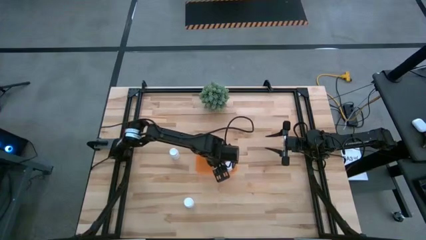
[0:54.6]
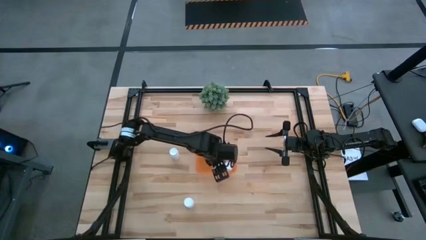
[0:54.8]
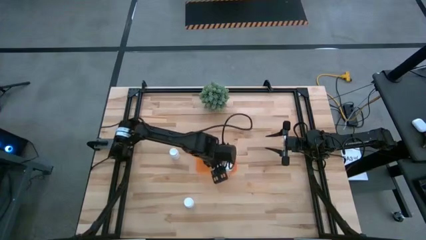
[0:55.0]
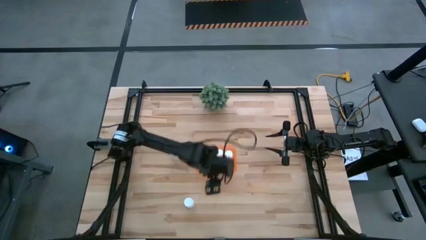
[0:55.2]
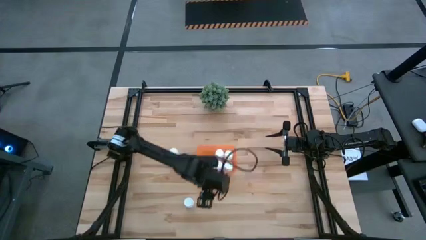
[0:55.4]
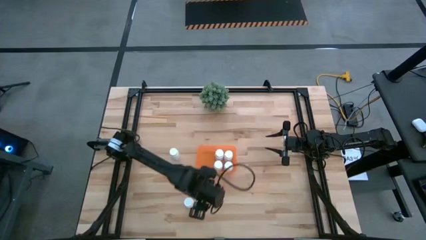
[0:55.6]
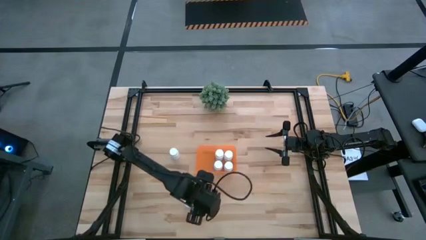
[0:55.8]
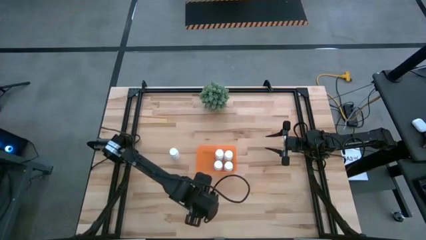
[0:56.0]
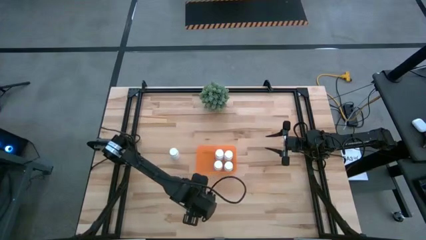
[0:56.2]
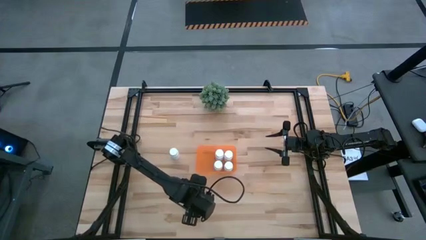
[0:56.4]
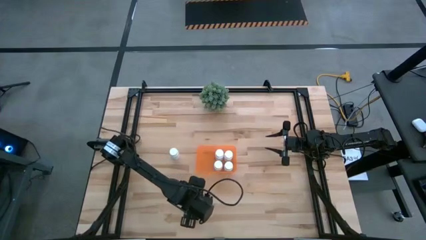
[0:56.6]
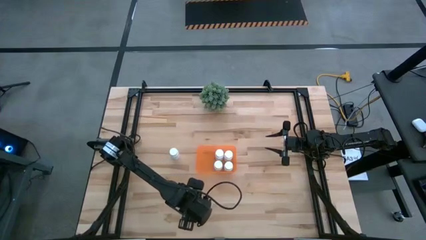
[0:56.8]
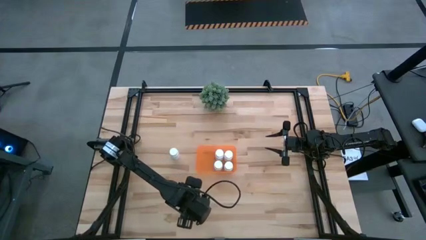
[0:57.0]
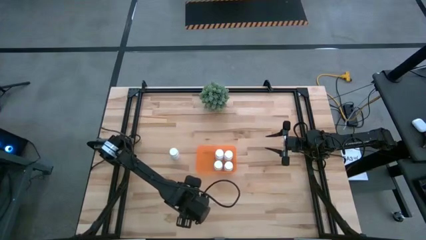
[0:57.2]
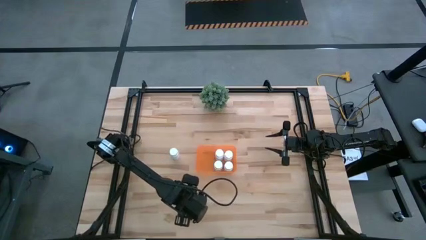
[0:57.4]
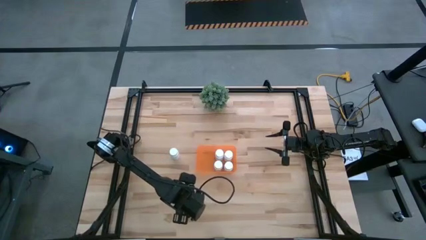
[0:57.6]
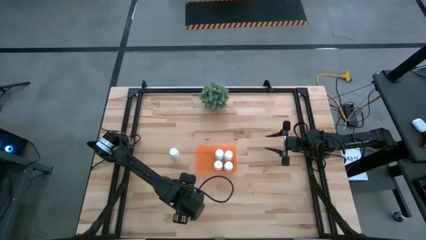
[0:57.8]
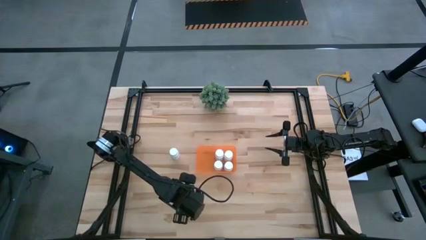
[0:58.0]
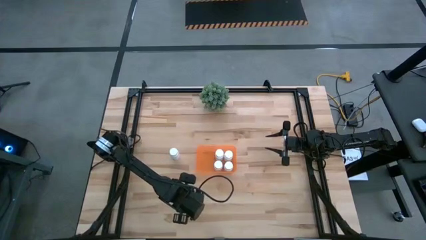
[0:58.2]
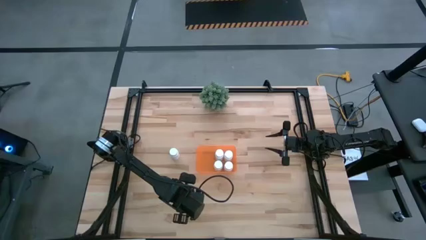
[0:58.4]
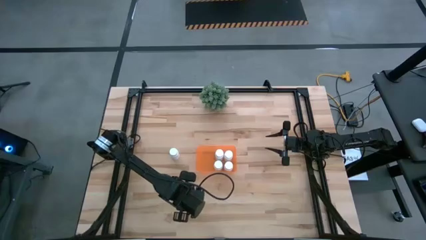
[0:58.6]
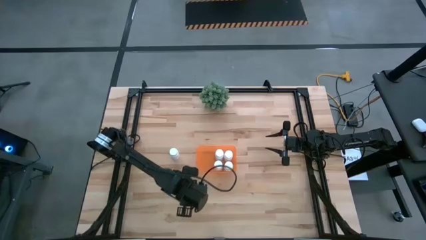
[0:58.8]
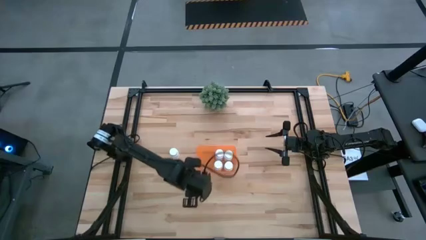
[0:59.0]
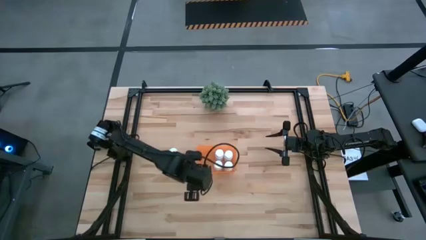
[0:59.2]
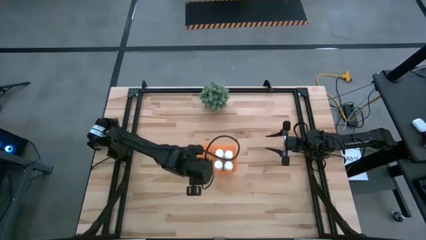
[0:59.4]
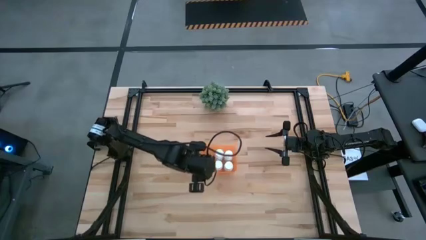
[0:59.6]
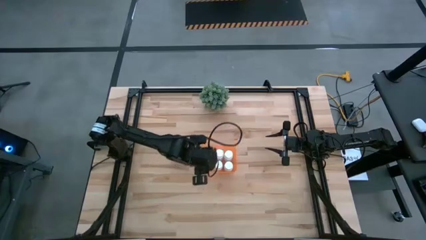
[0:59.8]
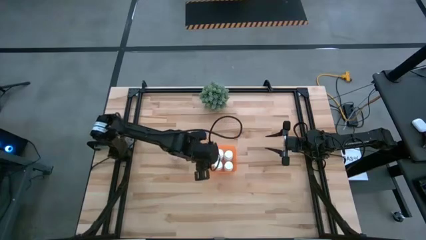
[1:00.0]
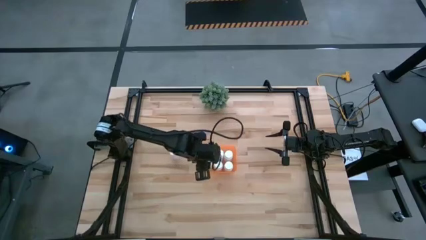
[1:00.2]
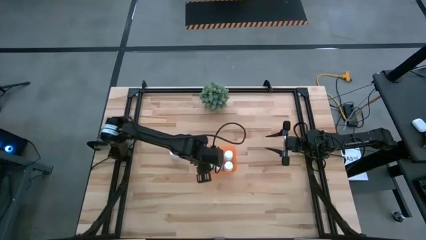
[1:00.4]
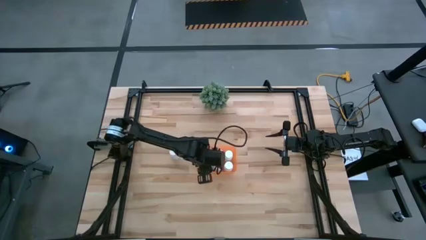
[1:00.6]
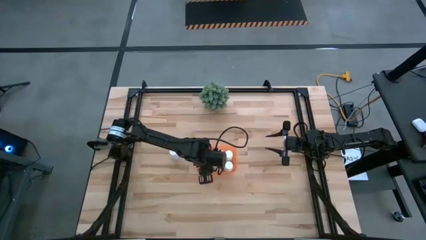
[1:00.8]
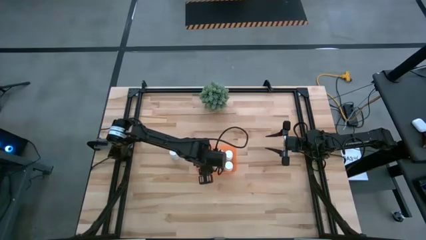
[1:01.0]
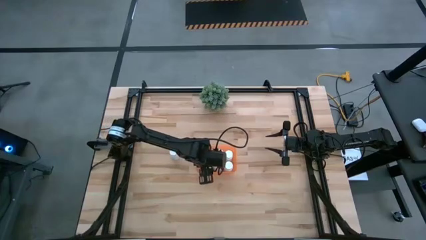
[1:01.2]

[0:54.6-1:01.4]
Task: Pick and place pill bottles into a basket
Put the white medicine bottle into the orange bin

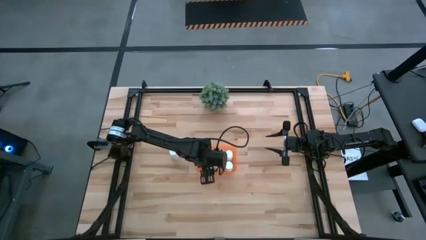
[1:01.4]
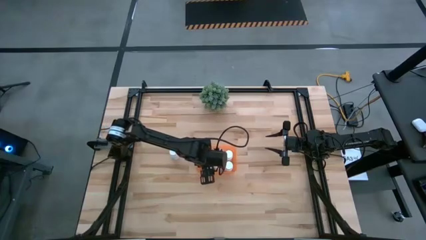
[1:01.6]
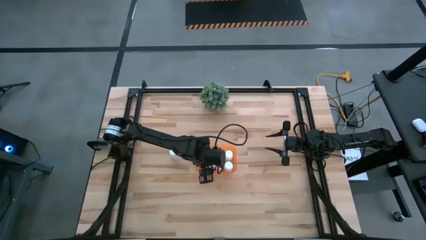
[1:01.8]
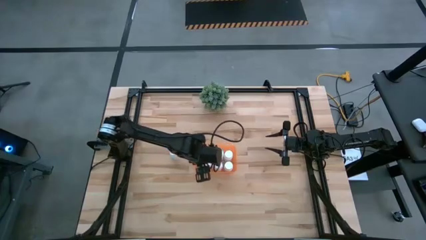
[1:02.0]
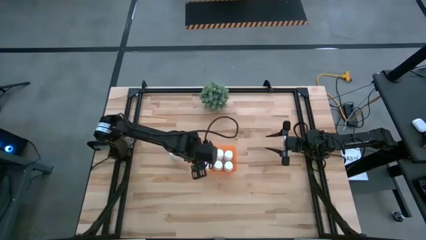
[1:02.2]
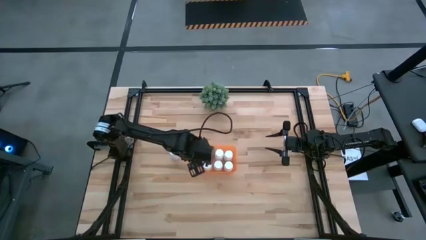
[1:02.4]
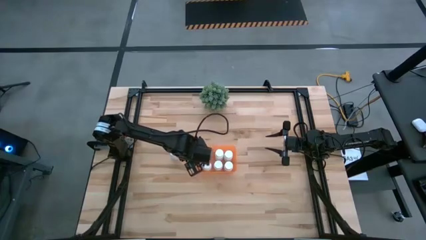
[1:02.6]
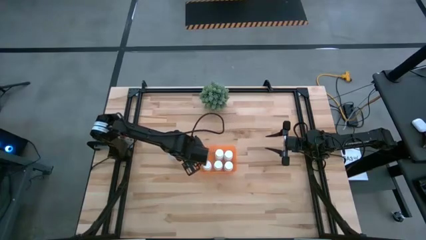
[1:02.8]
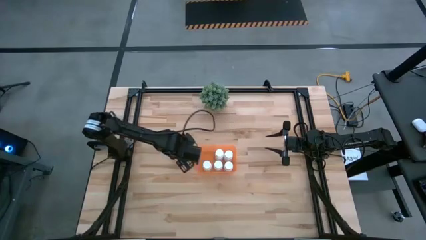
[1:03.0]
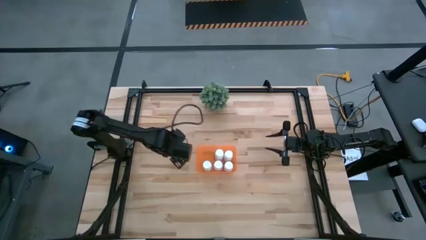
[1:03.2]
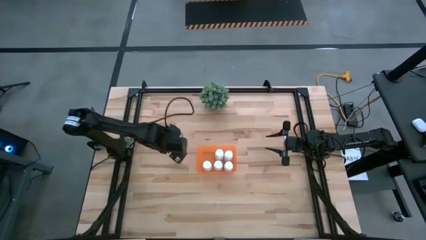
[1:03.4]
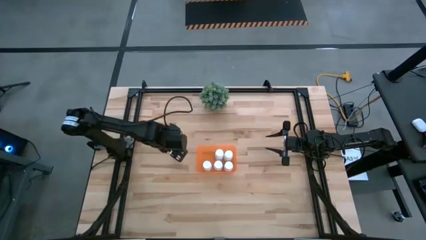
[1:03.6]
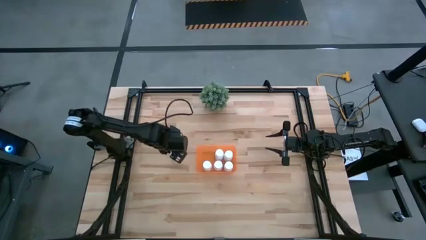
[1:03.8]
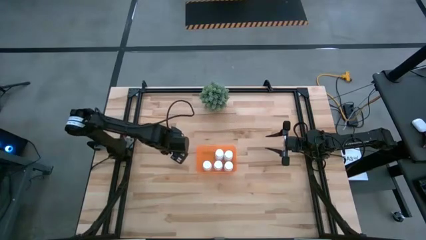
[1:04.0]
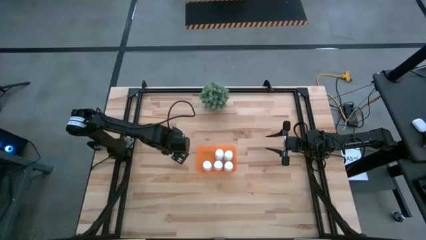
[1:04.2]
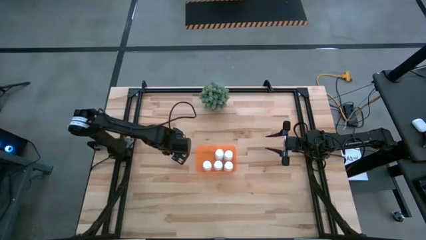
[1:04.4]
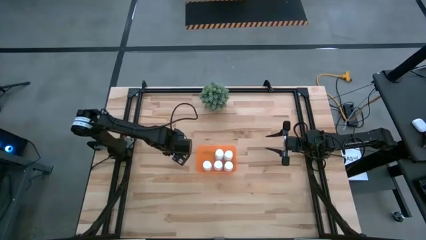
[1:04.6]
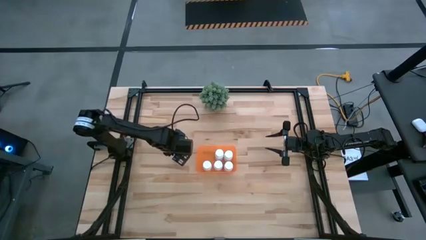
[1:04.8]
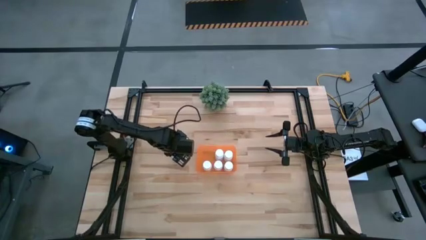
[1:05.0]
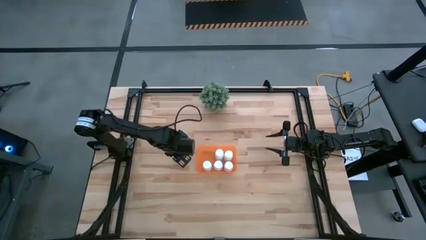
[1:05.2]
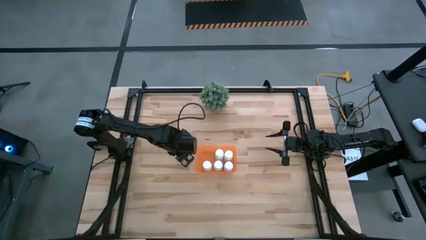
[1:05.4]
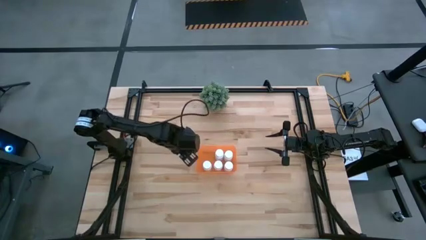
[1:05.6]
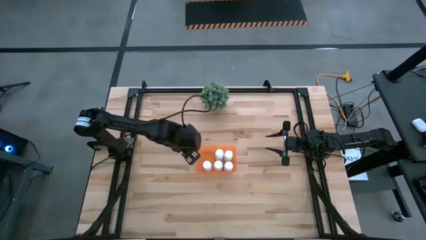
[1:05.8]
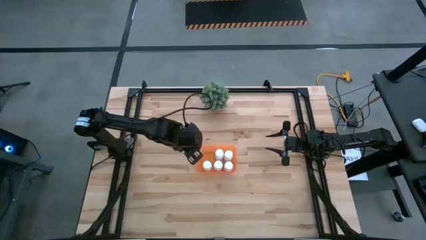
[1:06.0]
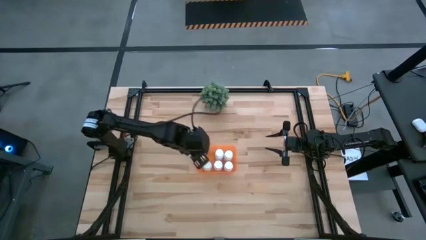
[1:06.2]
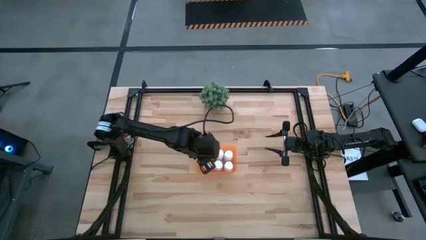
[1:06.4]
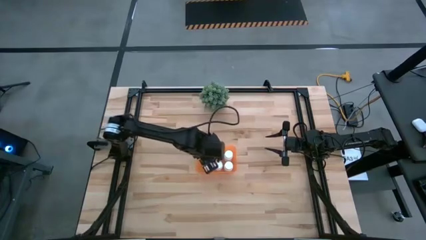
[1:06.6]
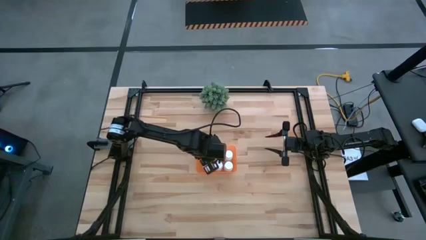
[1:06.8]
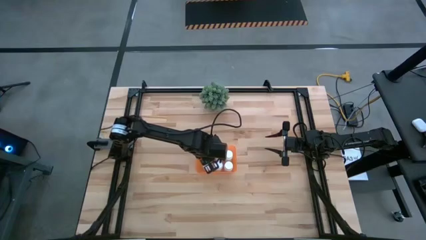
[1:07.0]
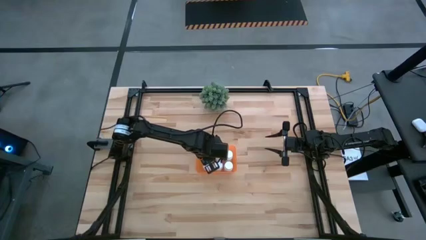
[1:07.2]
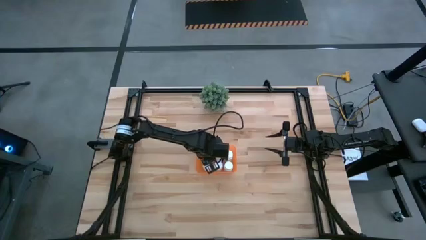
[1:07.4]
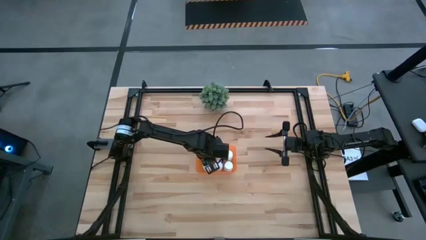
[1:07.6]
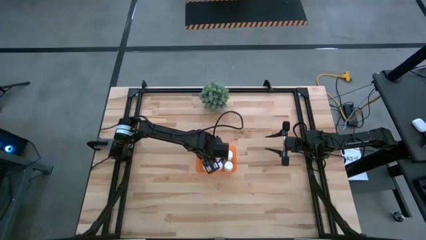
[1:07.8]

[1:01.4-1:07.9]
Put the white medicine bottle into the orange bin

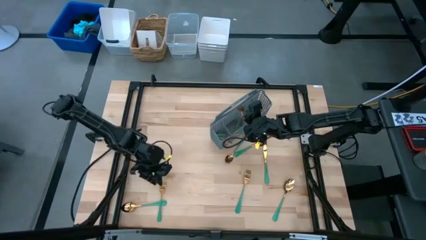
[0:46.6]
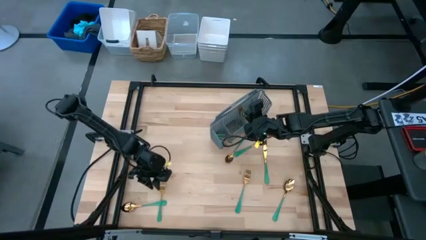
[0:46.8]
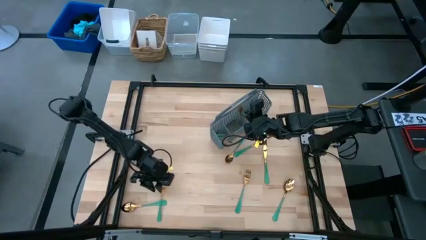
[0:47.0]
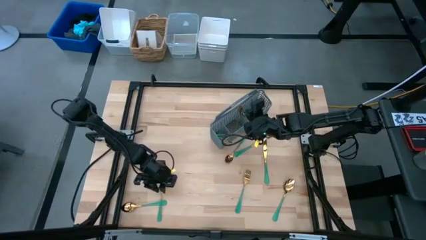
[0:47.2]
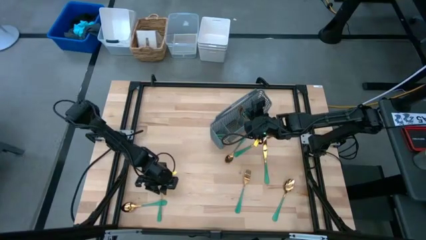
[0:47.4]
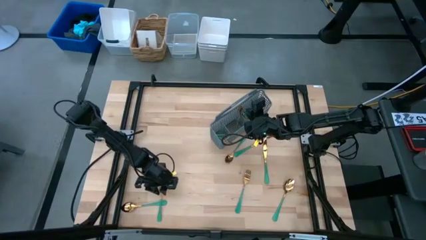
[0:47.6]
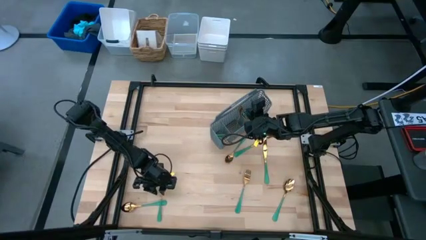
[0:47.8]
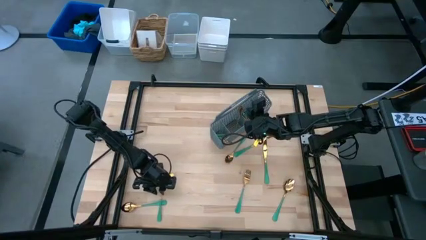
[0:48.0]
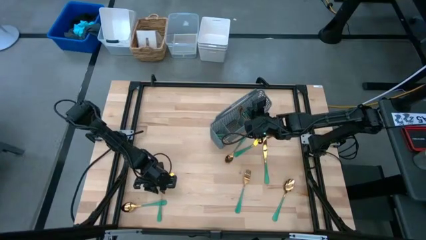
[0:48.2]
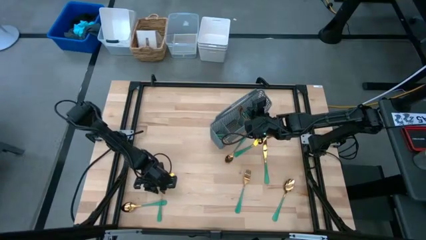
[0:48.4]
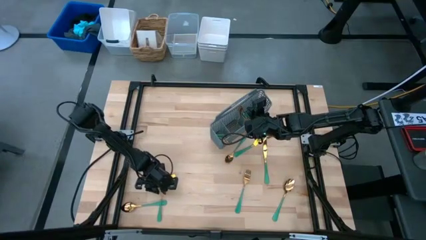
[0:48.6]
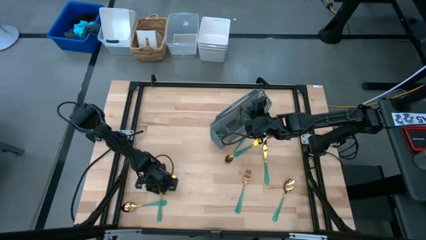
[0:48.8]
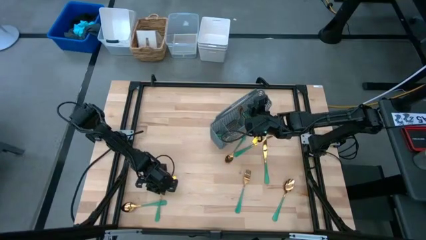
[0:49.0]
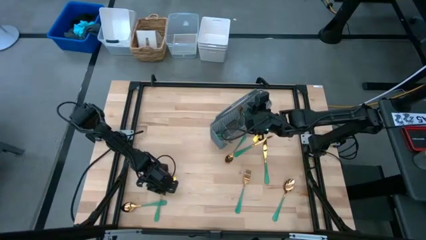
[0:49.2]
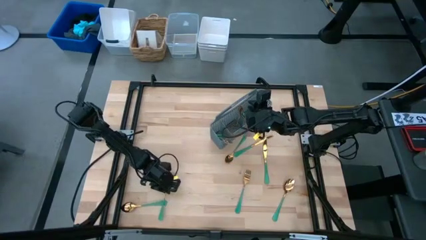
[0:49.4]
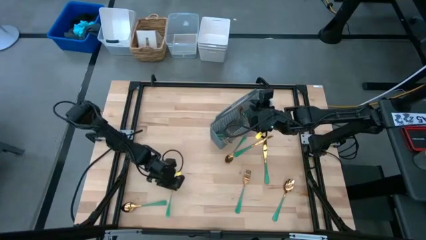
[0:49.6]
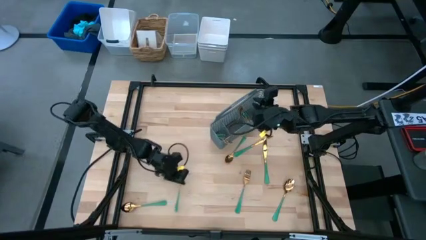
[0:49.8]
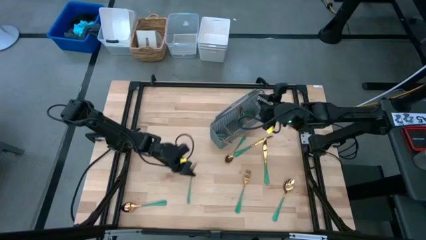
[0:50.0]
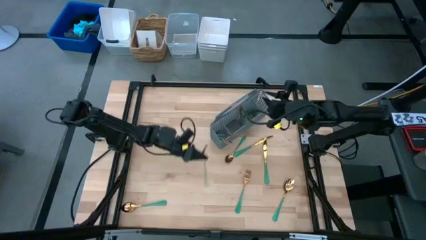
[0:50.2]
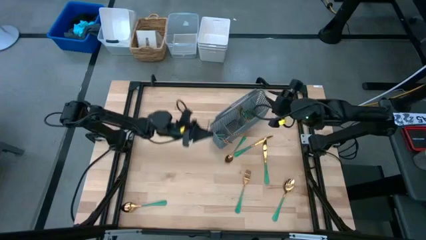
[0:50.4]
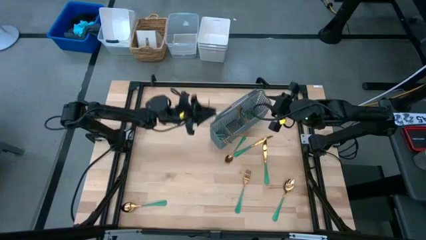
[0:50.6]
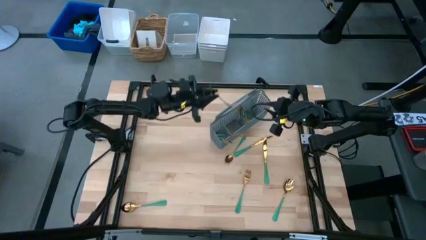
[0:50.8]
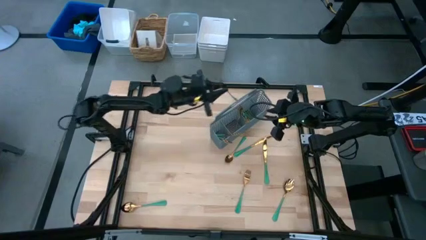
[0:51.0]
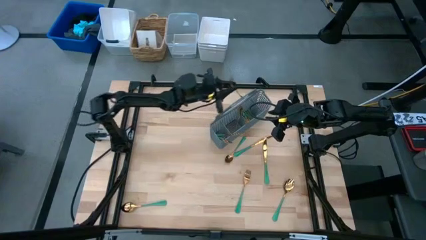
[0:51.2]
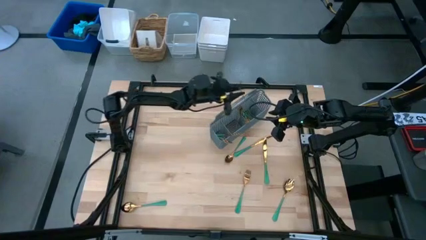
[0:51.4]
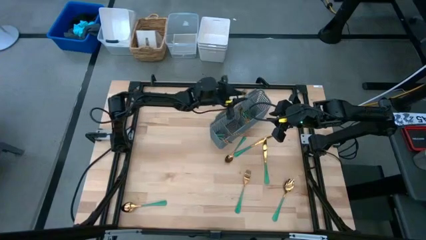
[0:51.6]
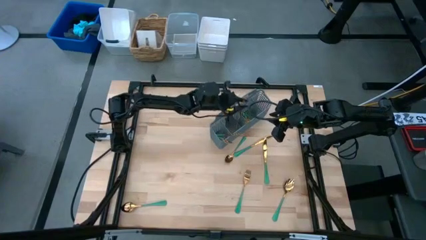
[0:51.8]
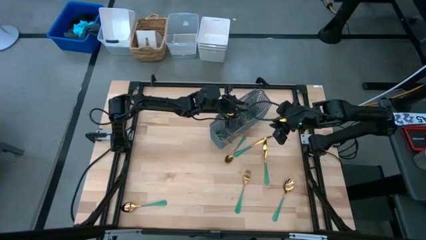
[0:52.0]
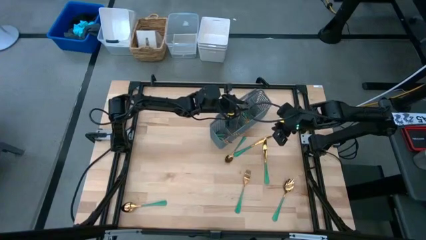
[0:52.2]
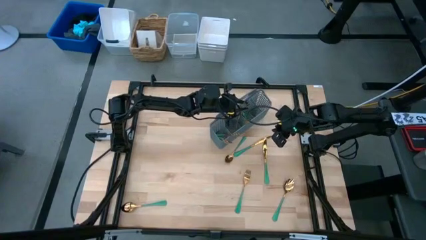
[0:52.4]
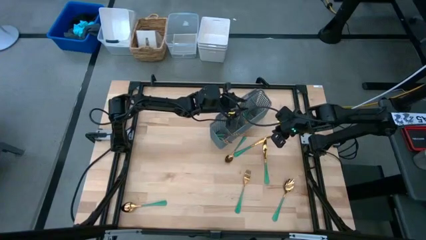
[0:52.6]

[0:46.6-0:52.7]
Task: Sort silverware
Put the left fork into the basket
